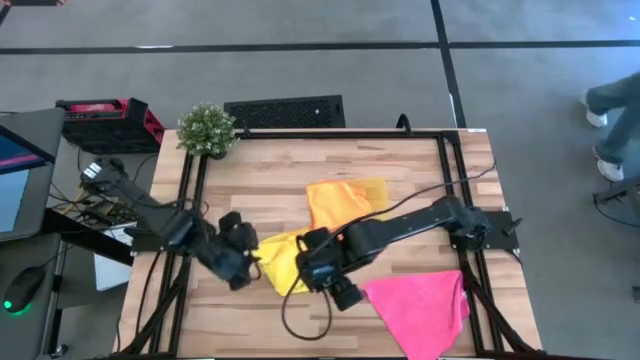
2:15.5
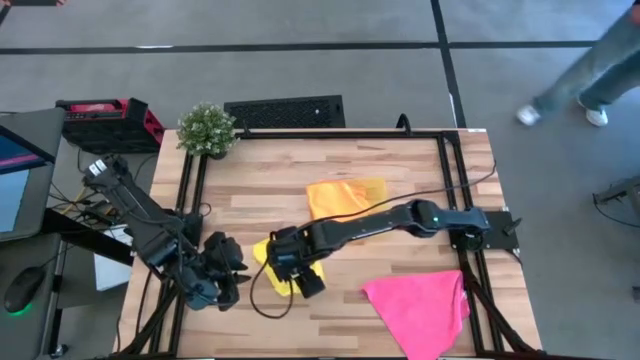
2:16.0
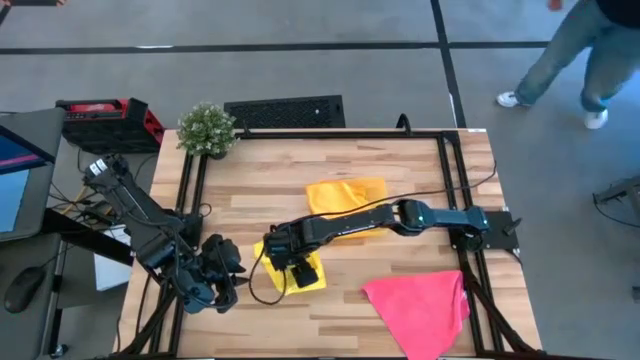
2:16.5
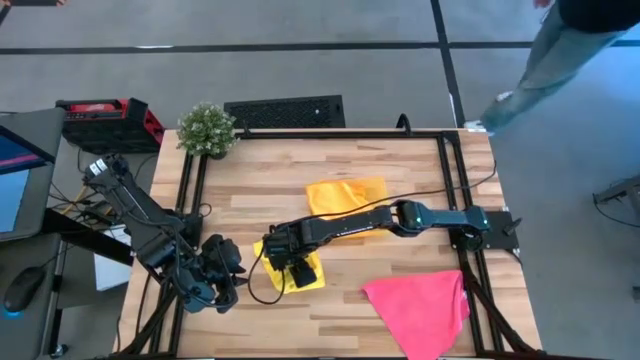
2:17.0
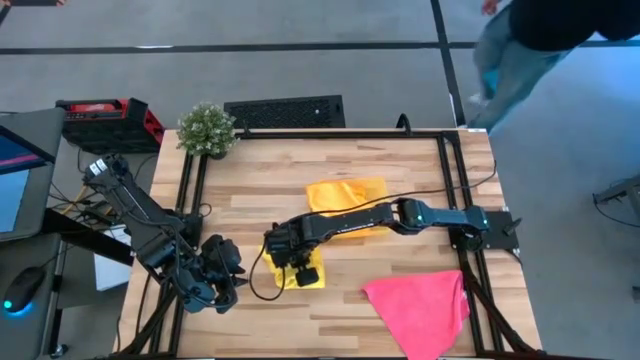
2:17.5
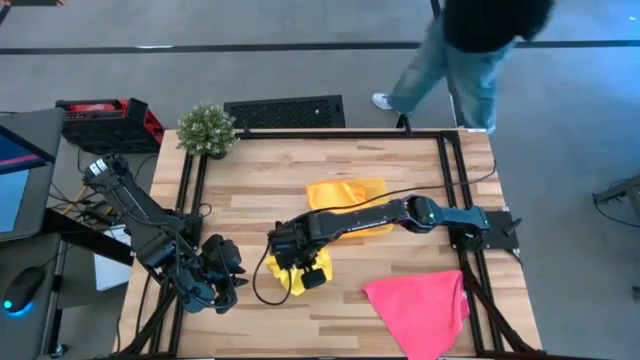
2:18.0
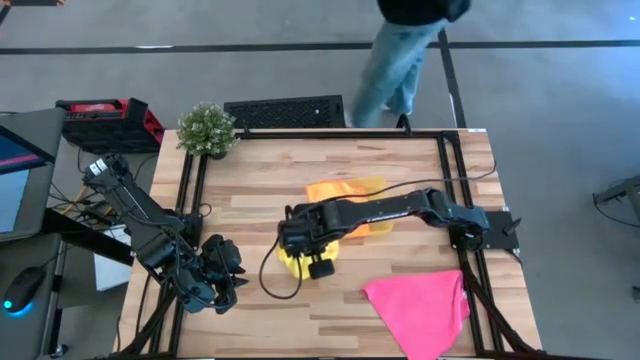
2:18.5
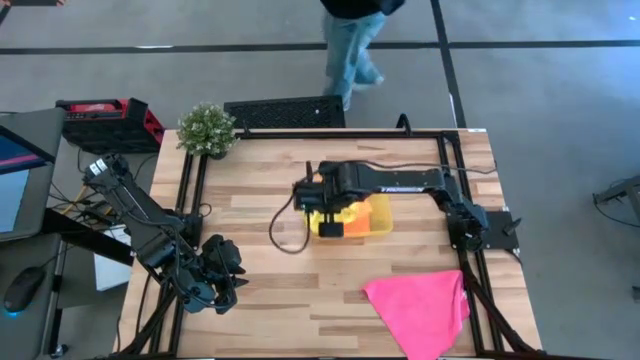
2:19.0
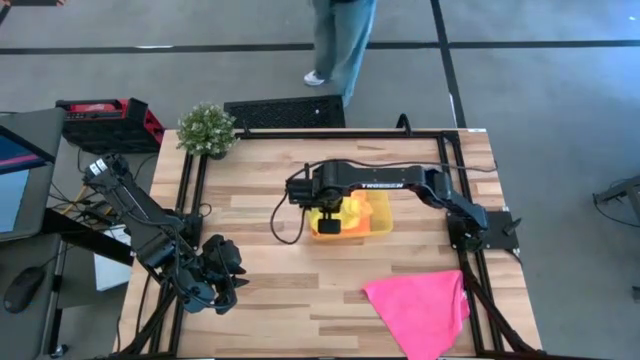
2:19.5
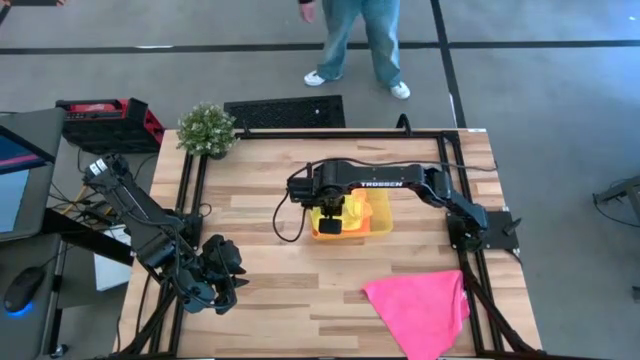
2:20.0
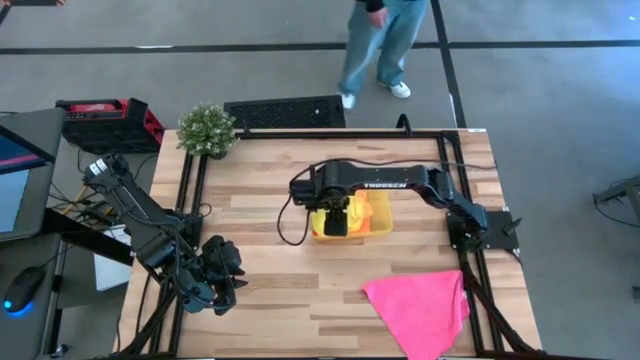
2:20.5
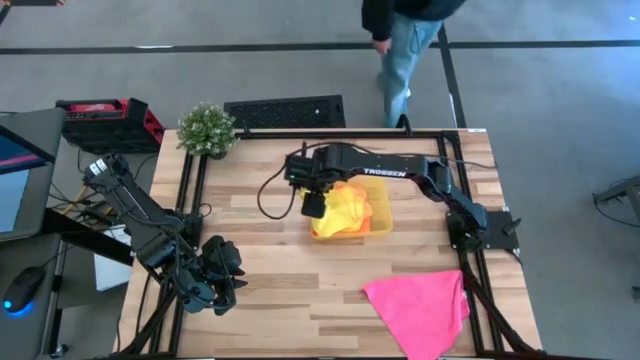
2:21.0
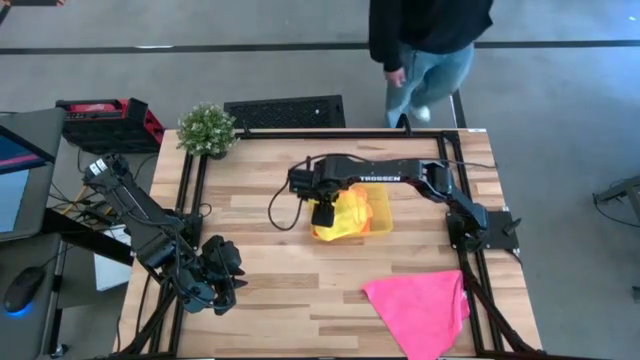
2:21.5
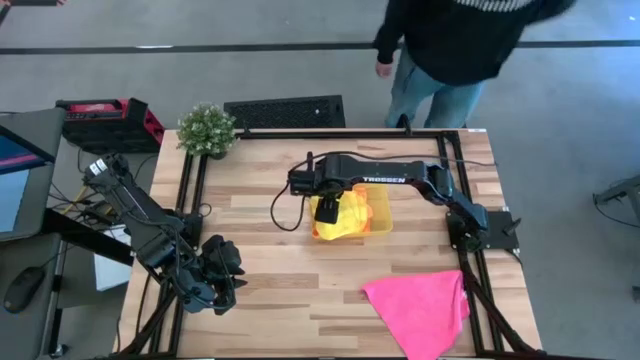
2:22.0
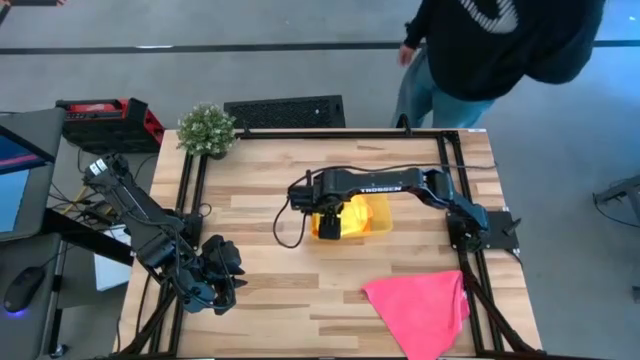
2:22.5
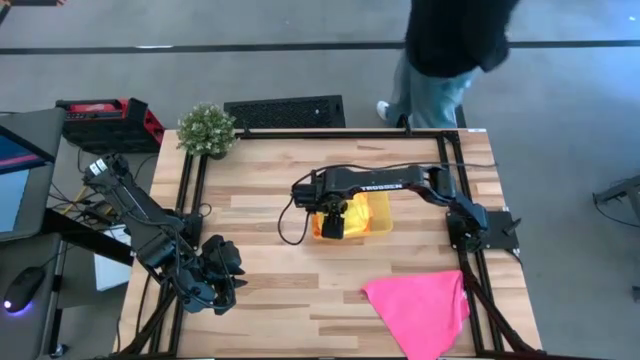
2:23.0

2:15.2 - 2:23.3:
Task: Fold microfiber towels
Put the folded yellow microfiber towel into the yellow bin

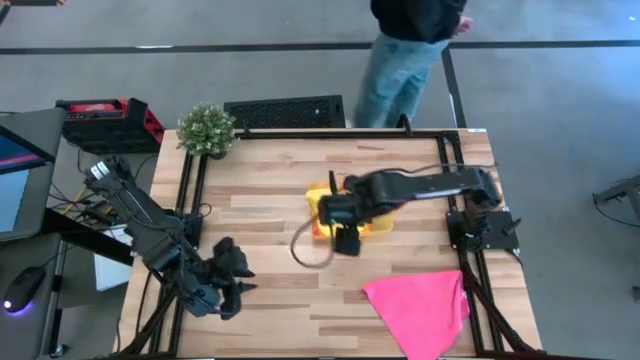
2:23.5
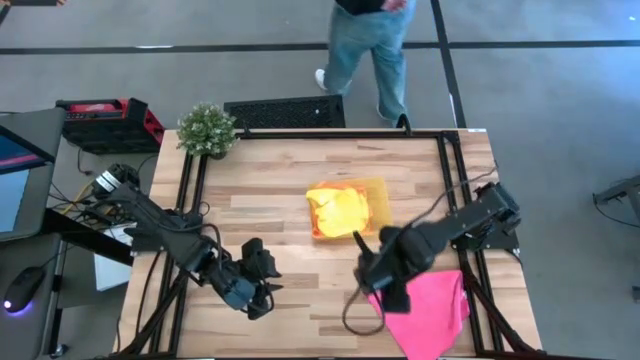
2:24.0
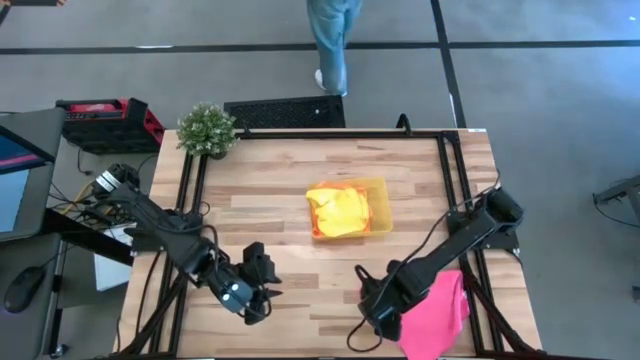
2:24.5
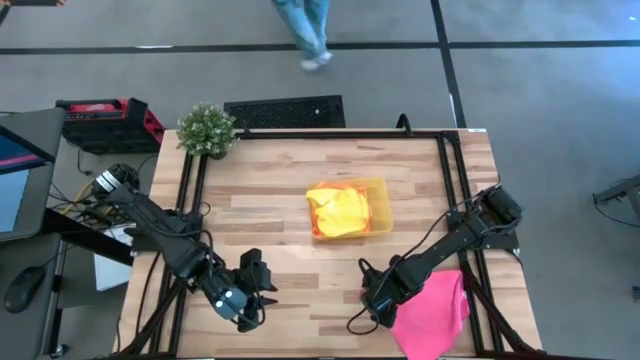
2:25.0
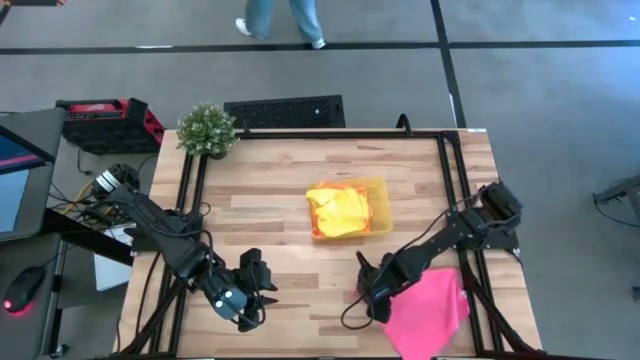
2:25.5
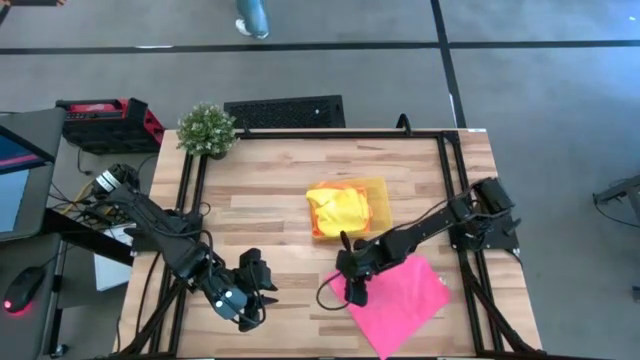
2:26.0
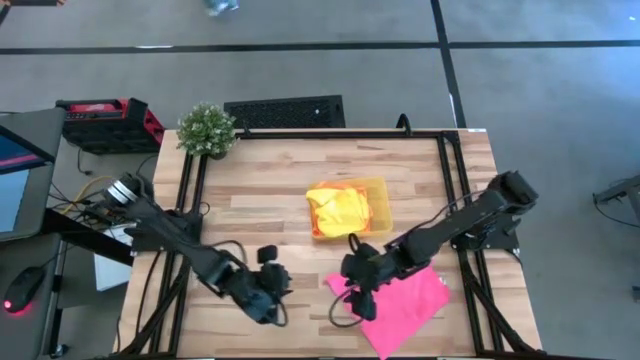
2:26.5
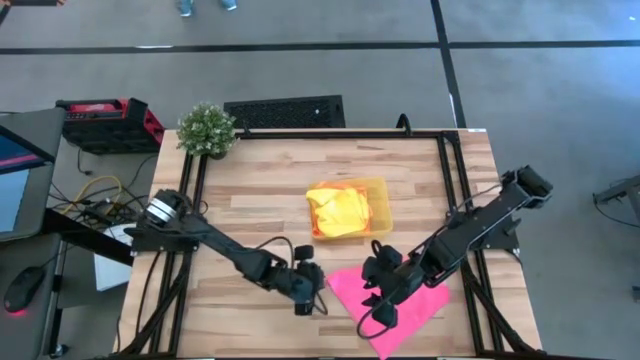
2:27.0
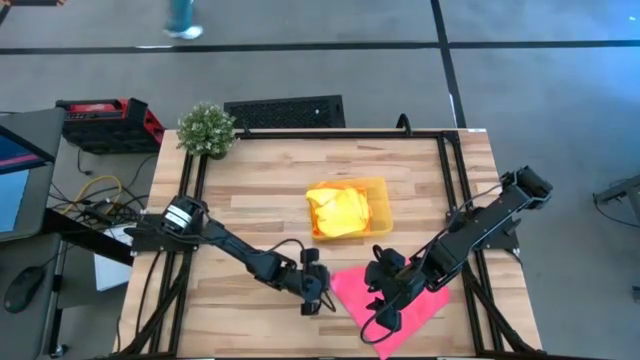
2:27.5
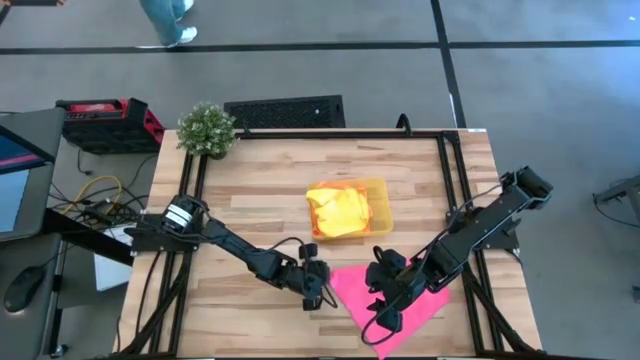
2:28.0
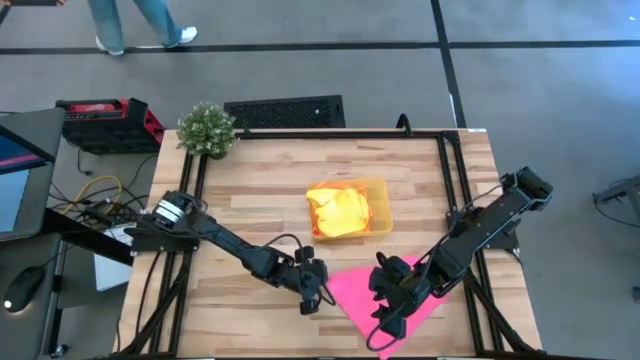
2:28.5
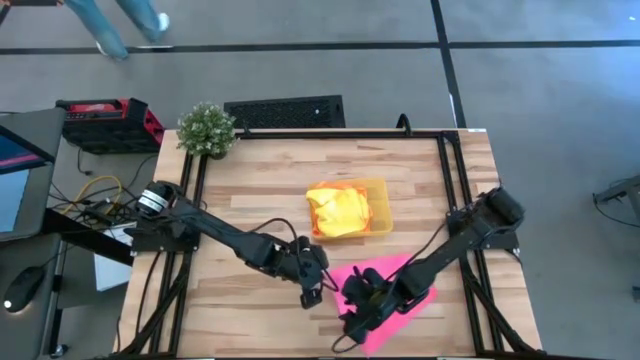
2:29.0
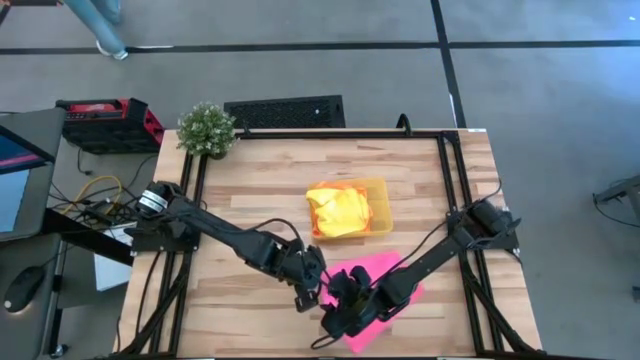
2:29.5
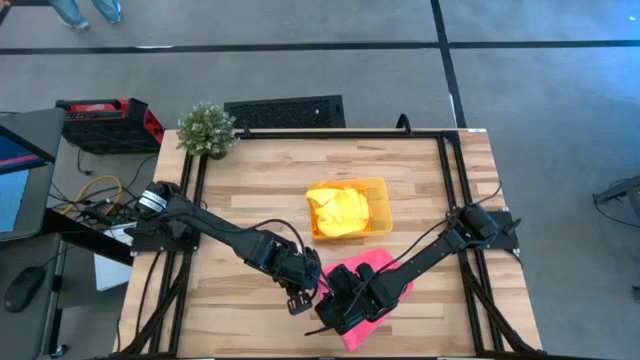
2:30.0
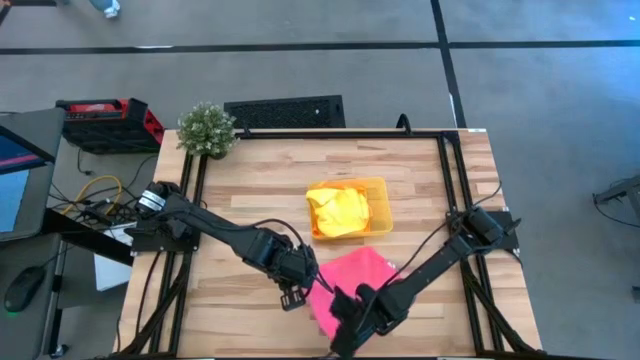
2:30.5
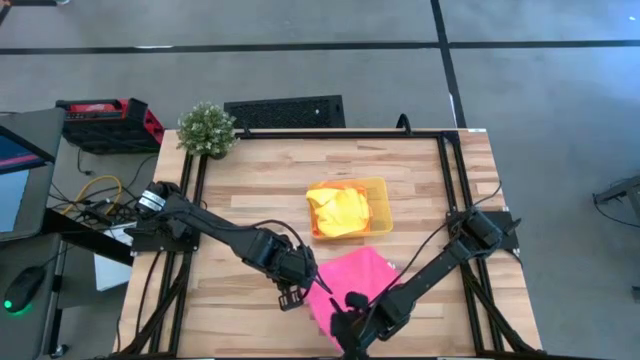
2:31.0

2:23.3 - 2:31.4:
Fold the pink microfiber towel

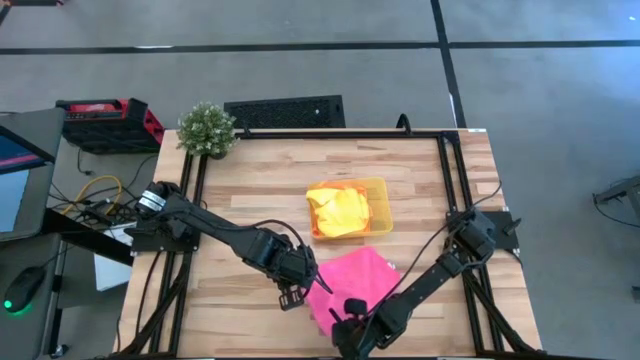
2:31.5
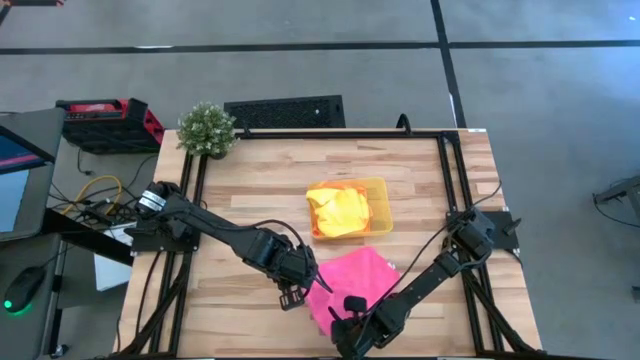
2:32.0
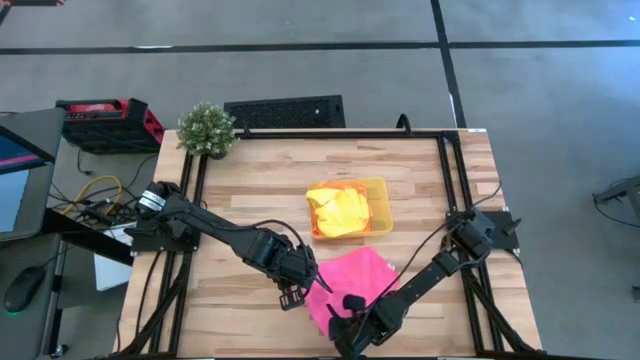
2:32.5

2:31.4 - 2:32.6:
Fold the pink microfiber towel

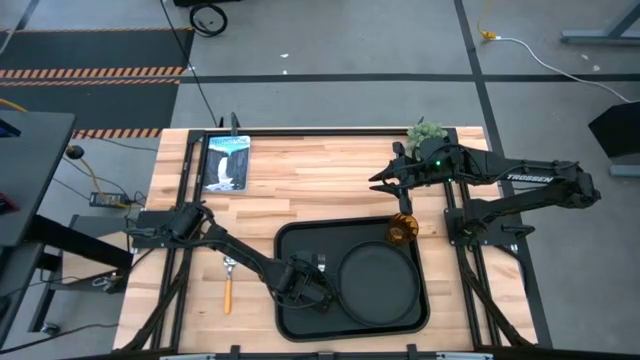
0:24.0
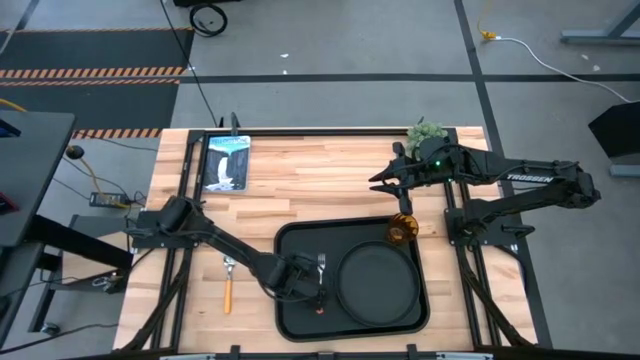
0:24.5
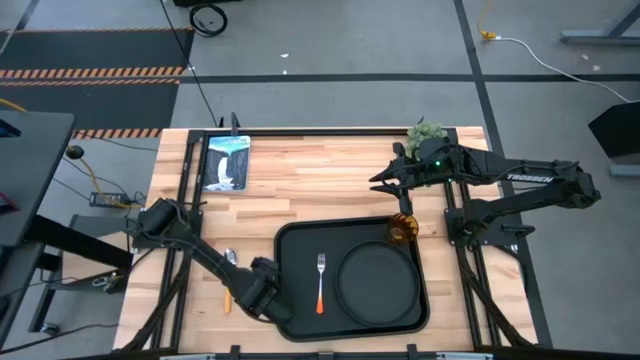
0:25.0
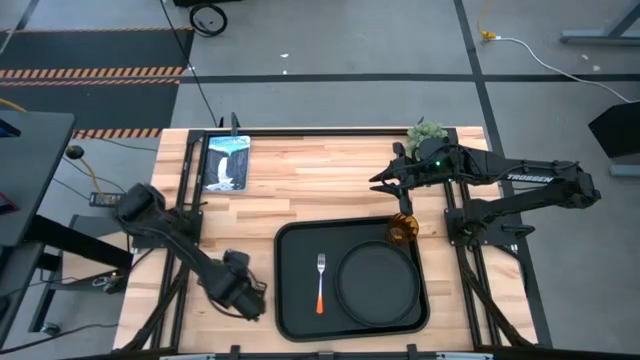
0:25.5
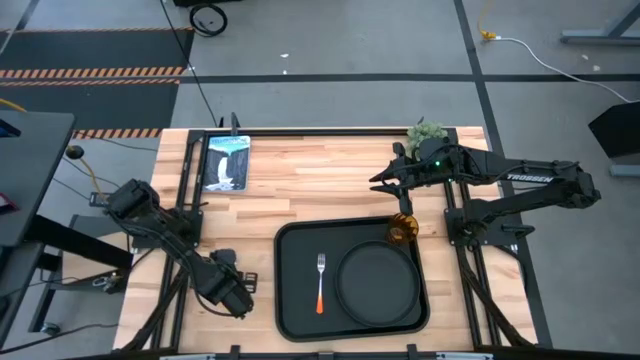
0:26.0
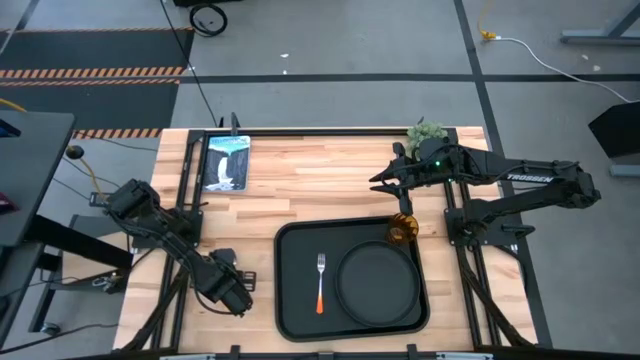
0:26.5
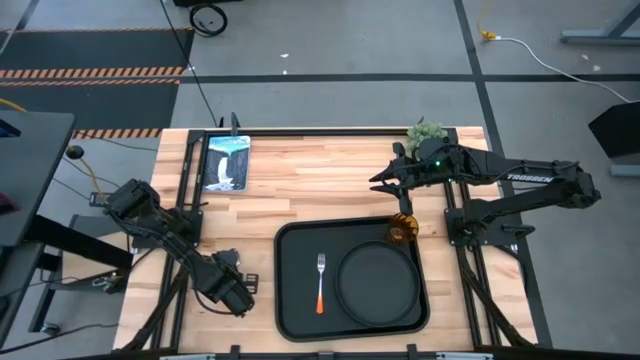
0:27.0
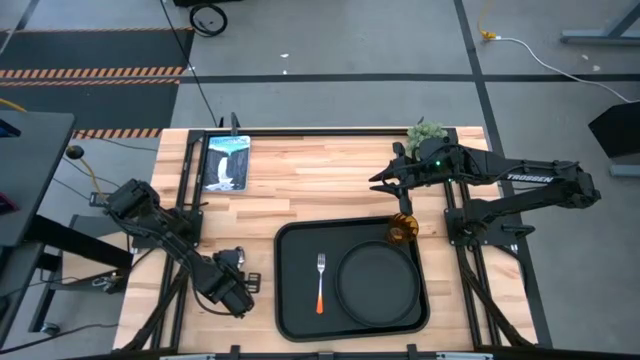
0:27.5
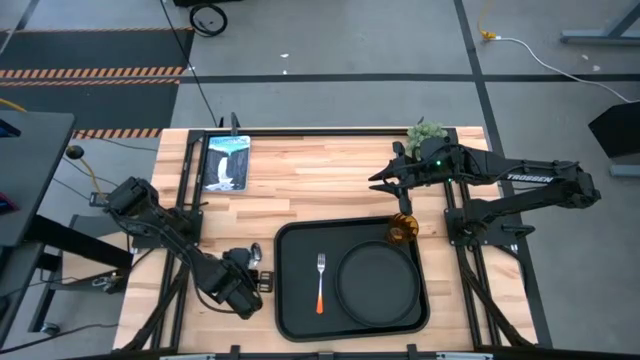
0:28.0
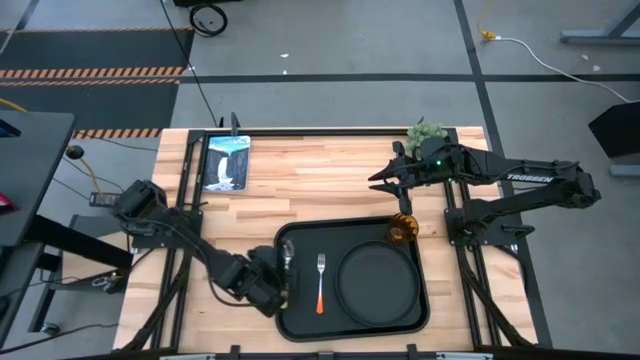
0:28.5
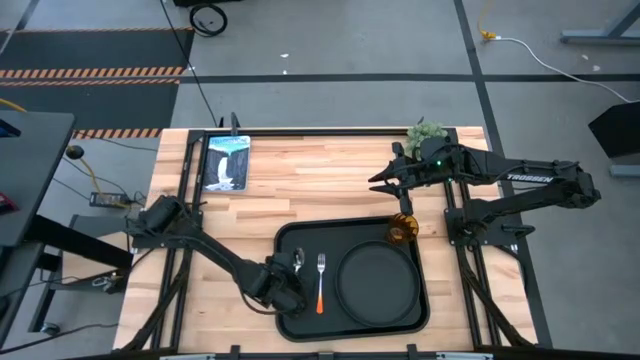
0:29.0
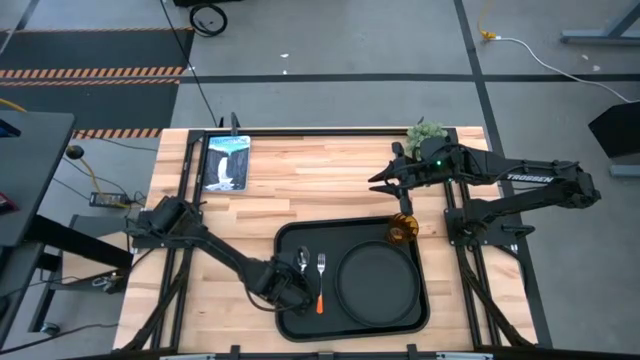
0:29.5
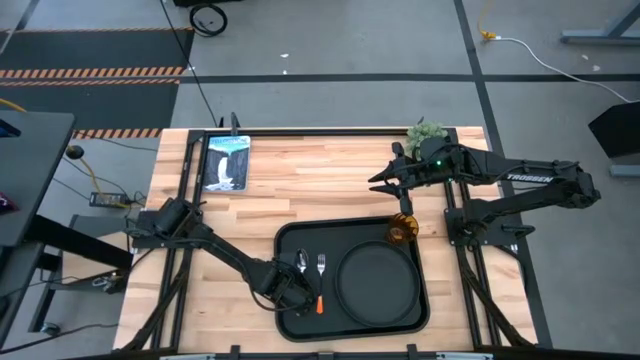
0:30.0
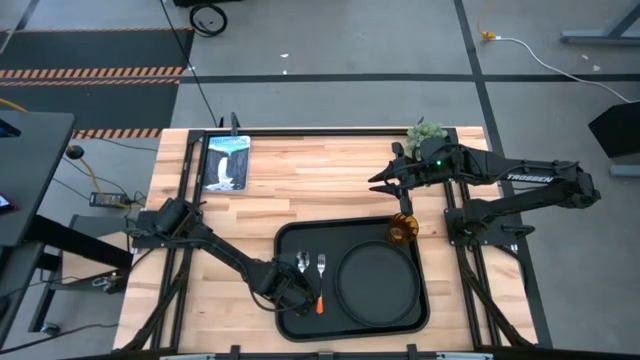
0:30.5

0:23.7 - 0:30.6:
Task: Pick and place plate/cup/fork/spoon on tray
Put the yellow spoon on the black serving tray to the left of the orange fork
